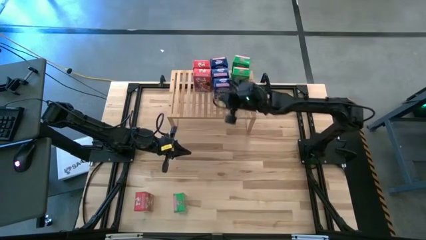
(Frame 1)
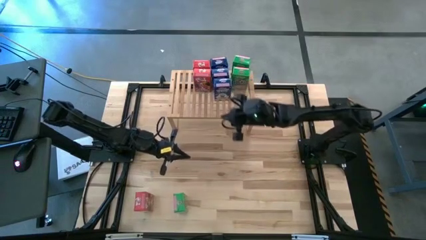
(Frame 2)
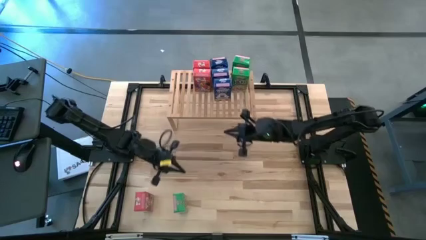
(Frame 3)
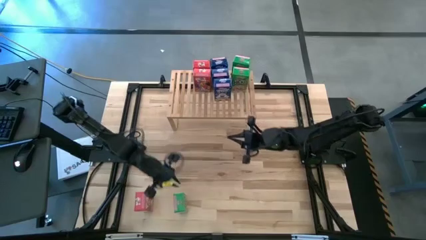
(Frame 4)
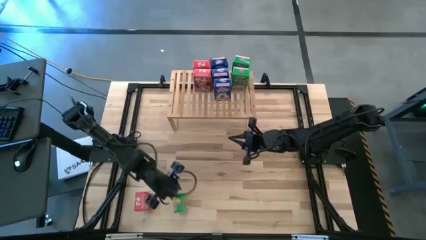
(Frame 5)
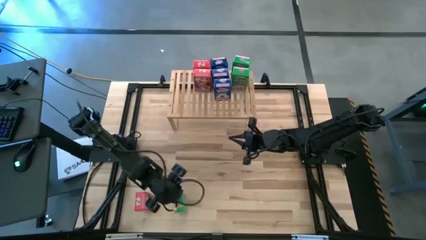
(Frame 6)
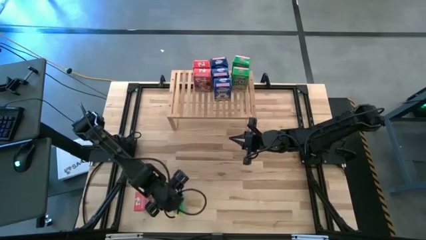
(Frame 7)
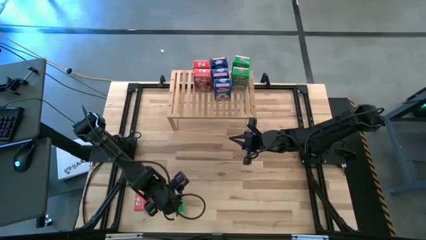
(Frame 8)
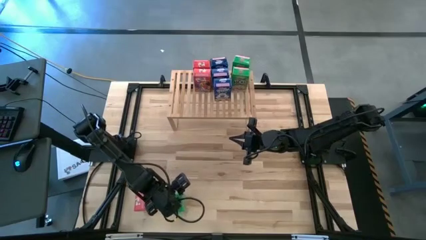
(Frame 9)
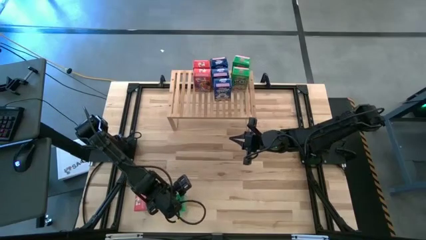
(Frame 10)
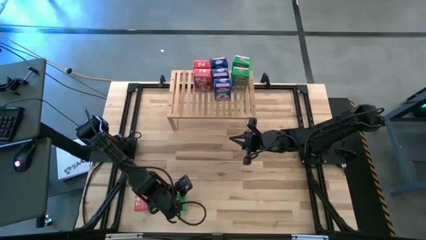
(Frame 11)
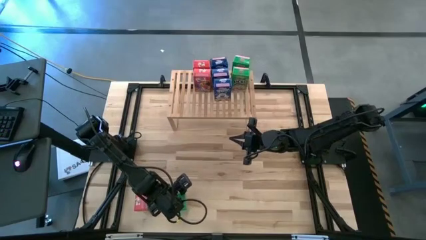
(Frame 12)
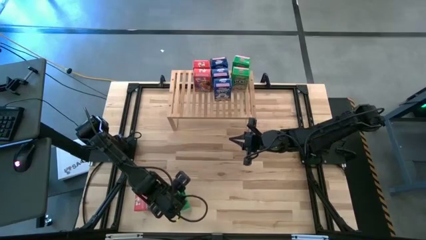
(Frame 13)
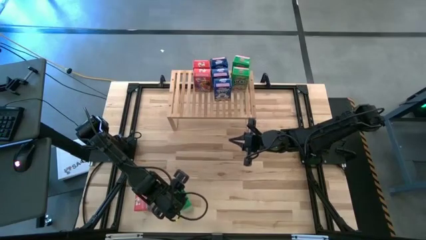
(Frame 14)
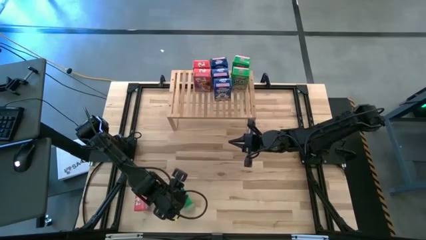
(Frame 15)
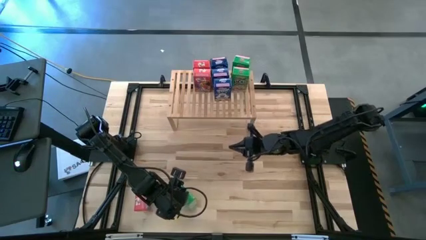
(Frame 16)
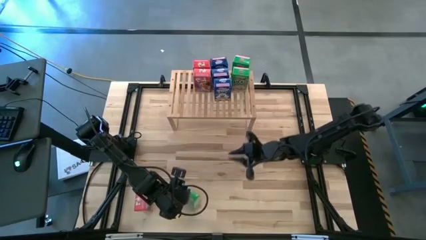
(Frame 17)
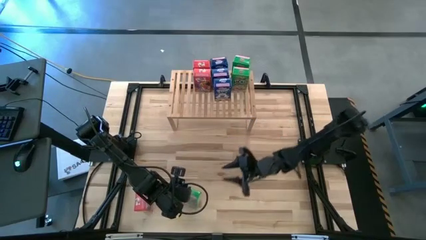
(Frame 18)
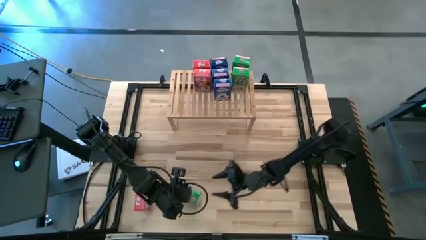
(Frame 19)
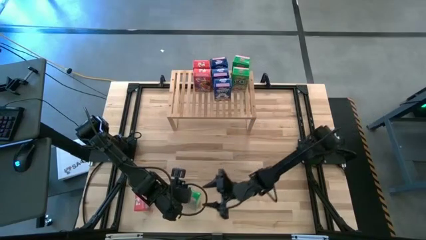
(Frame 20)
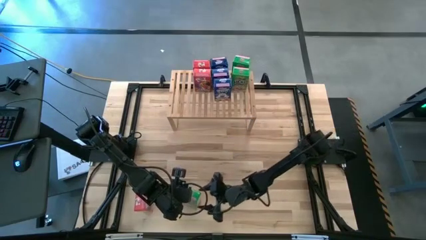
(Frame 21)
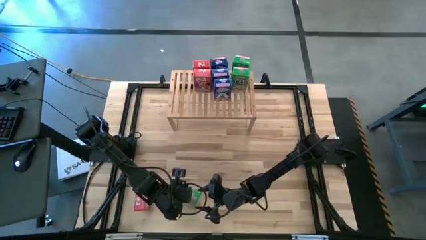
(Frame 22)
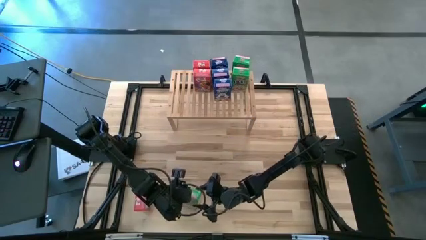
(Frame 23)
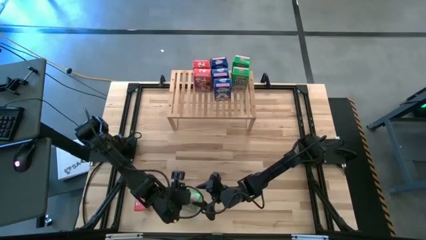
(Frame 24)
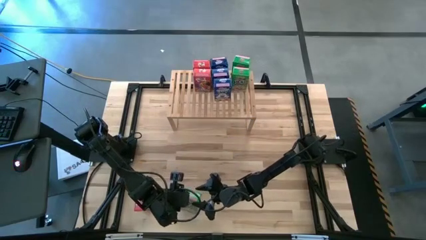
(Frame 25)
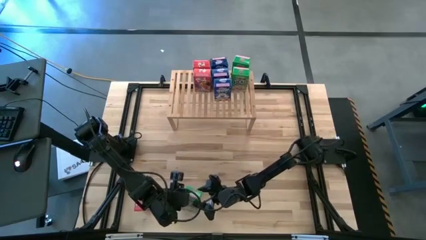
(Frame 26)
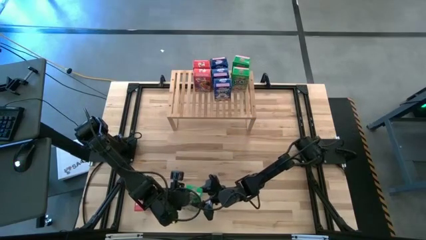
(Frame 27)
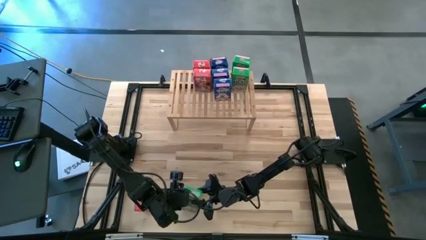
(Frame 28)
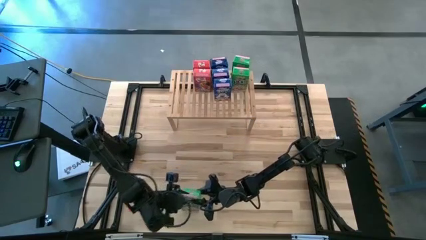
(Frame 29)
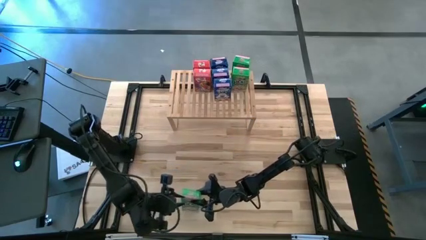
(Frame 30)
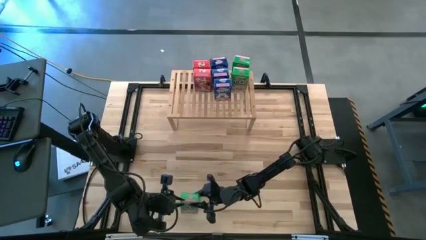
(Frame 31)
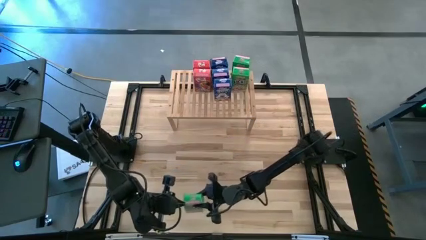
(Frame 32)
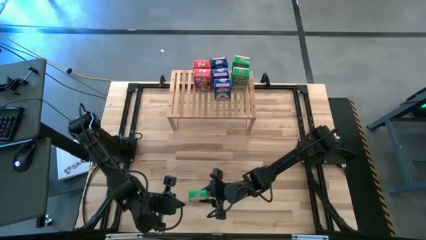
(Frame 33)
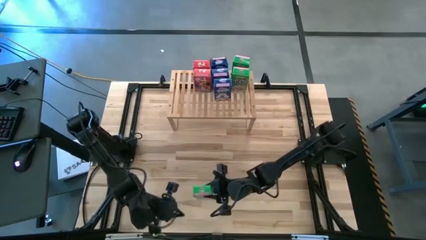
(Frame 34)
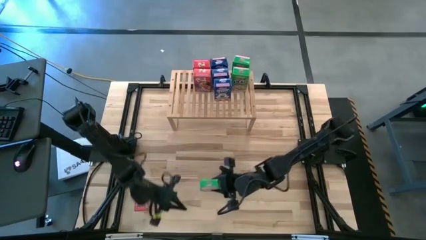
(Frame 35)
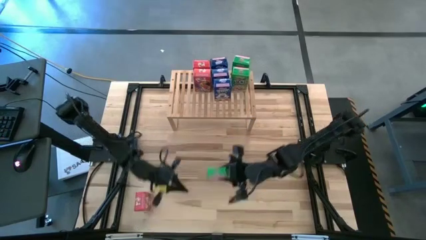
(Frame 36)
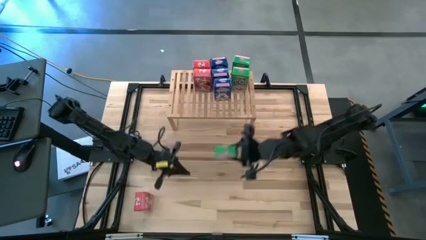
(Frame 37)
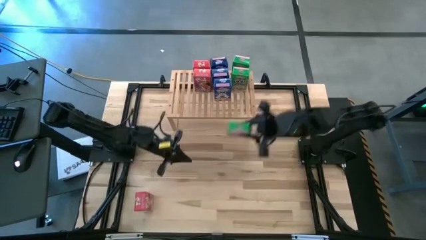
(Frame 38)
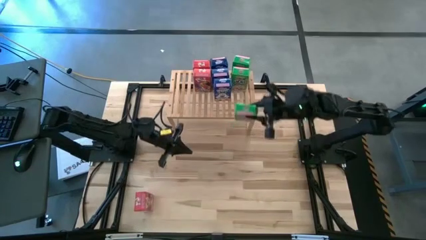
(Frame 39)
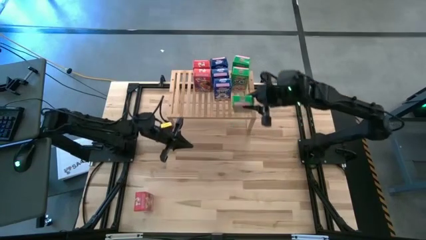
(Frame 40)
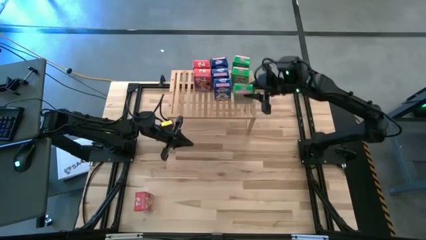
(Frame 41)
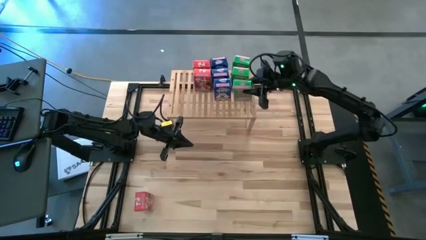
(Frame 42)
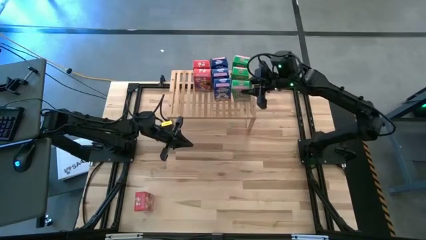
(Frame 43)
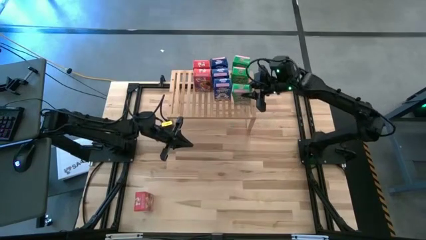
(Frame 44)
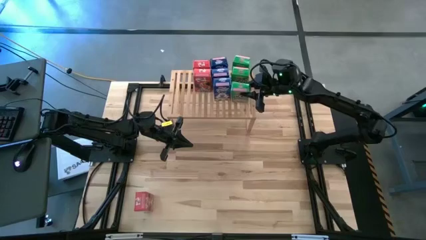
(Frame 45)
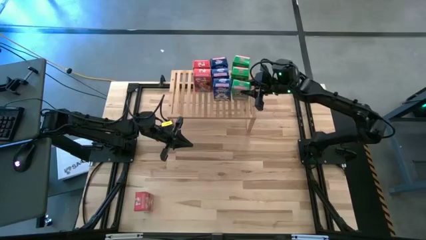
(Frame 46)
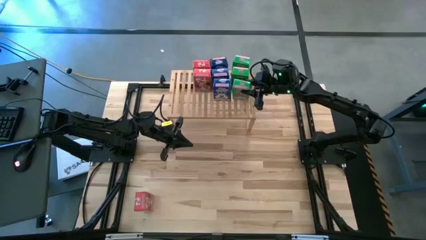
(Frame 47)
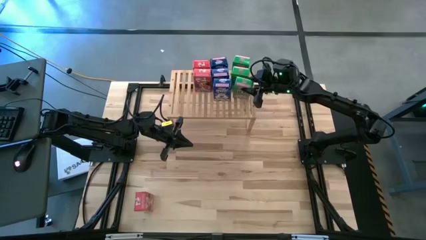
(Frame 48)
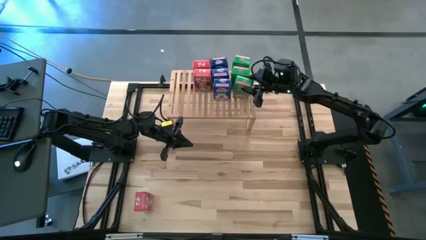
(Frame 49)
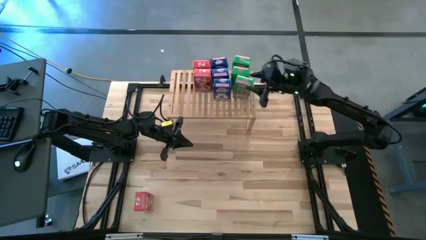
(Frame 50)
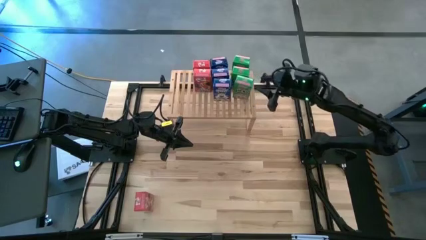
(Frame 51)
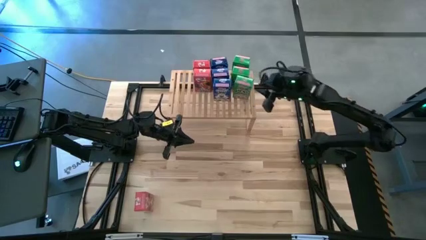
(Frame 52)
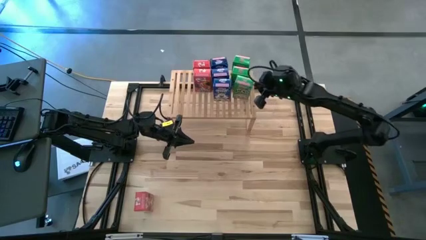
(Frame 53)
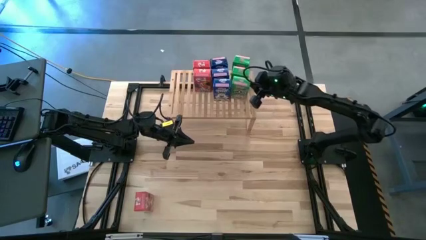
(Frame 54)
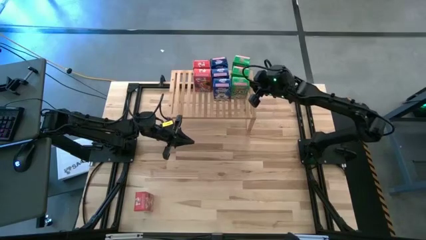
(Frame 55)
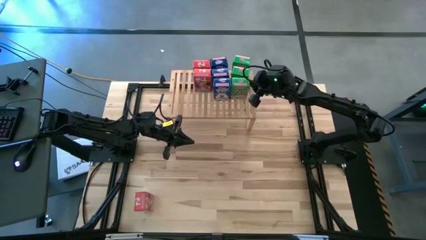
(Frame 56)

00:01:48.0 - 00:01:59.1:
Task: Stack cereal on shelf
Put the green cereal box aligned with the other green cereal box on the shelf

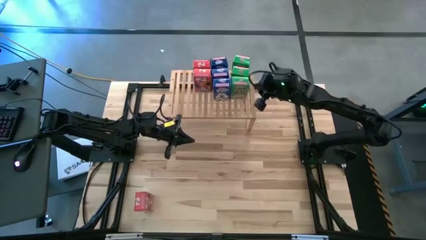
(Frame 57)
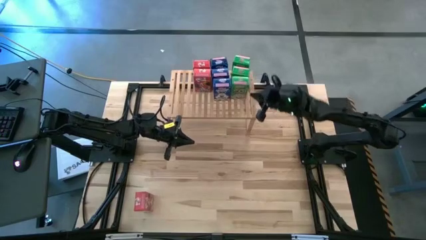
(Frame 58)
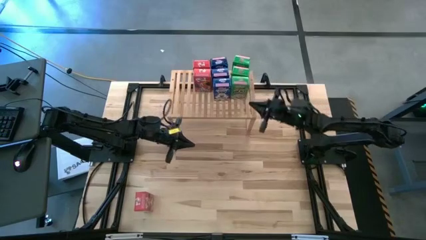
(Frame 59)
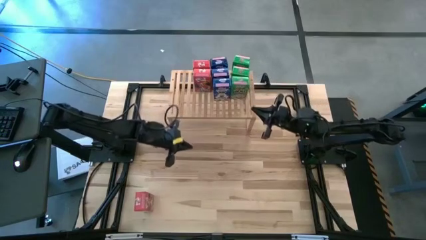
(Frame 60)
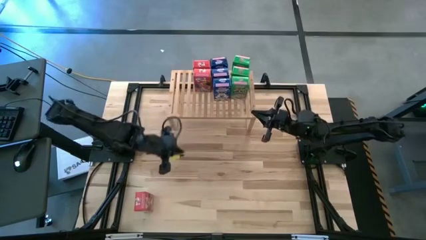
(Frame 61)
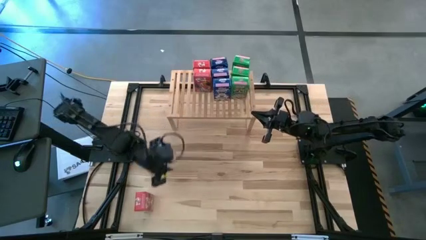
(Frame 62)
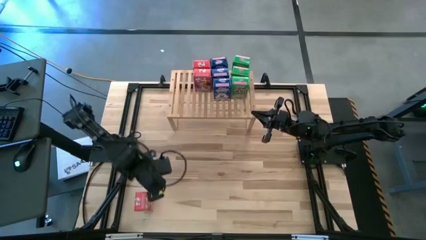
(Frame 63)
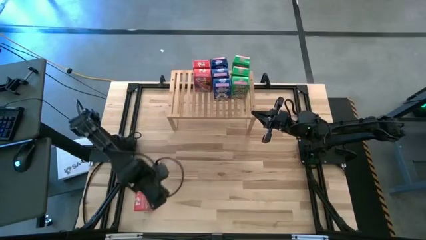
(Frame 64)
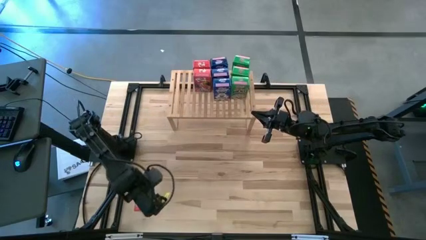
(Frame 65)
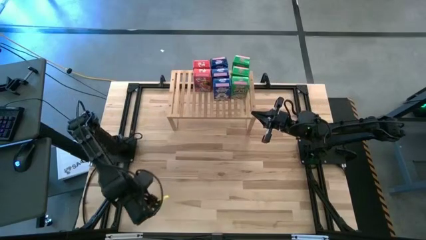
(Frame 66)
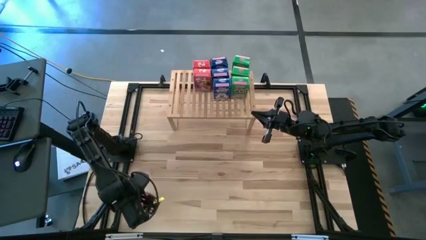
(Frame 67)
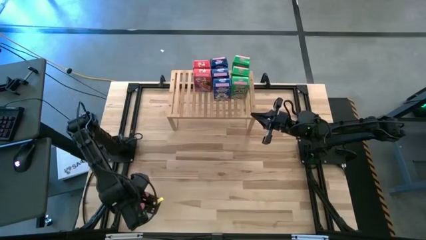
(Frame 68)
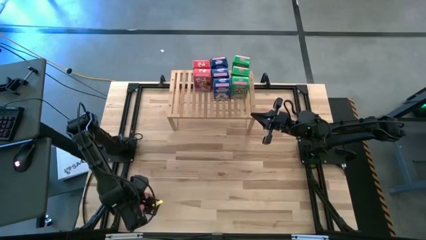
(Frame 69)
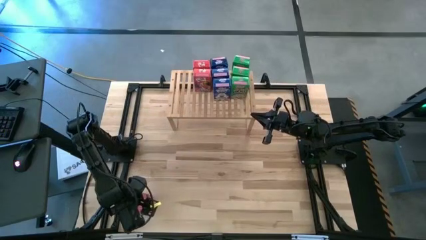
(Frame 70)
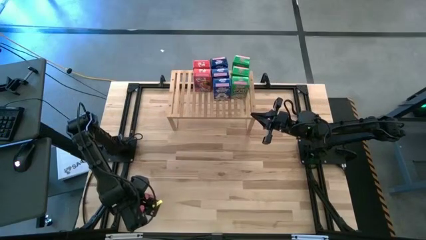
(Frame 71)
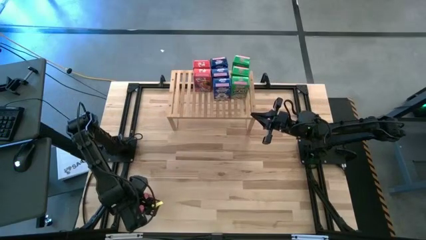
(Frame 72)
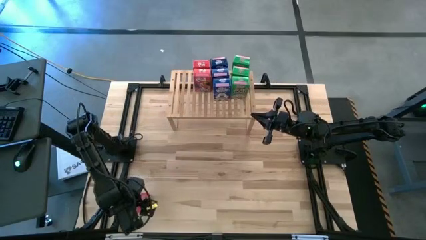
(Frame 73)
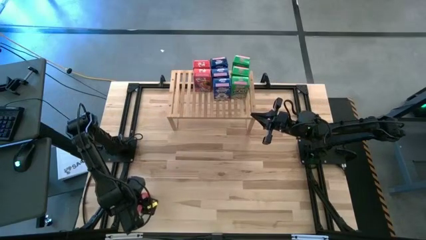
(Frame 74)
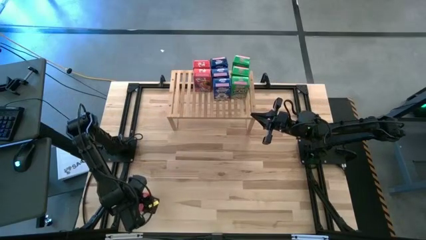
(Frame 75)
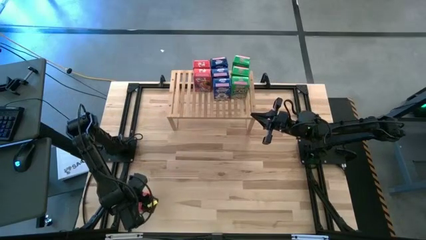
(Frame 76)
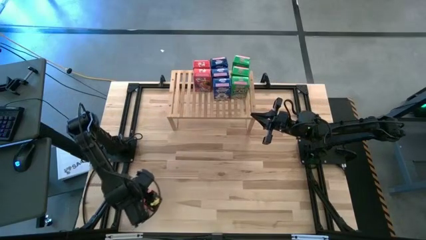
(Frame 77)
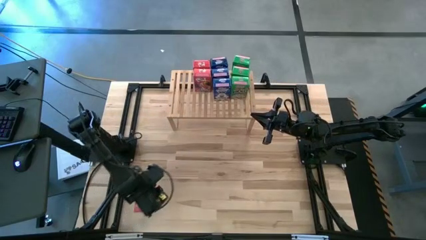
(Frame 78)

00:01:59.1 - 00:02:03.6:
Put the red cereal box aligned with the other red cereal boxes on the shelf
